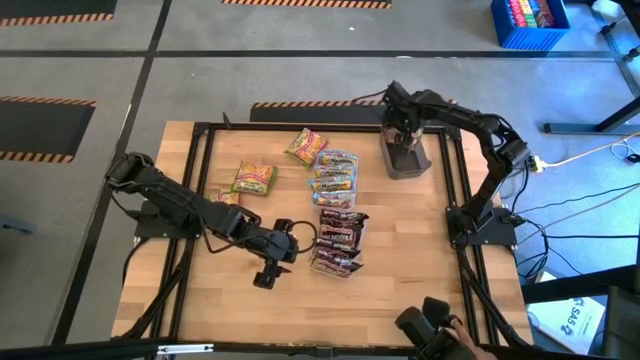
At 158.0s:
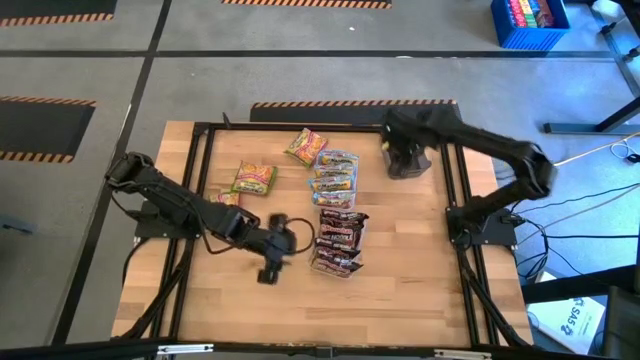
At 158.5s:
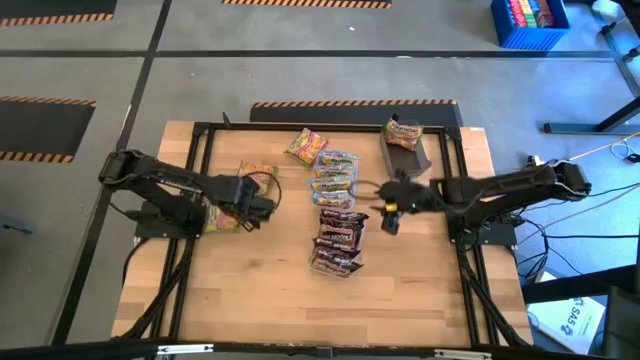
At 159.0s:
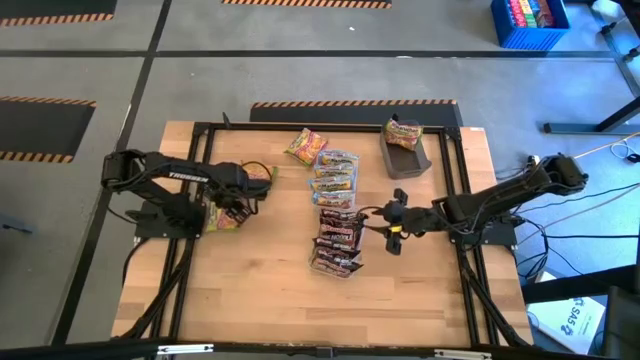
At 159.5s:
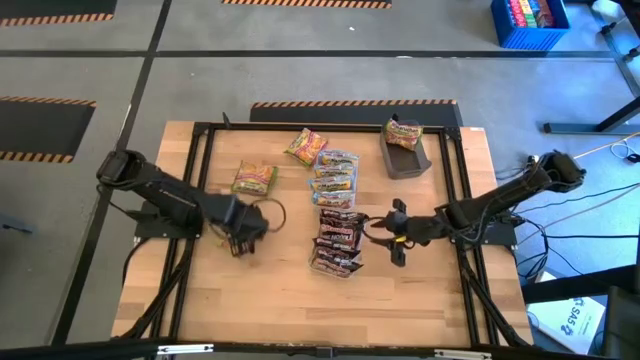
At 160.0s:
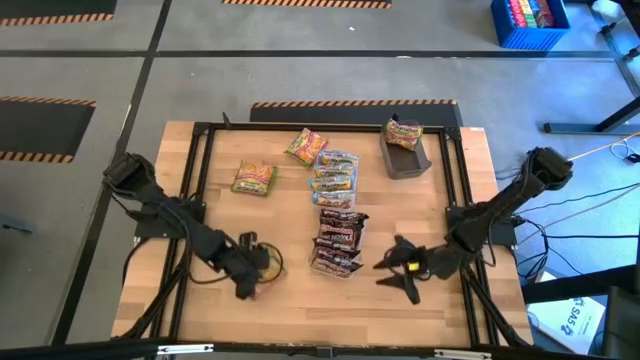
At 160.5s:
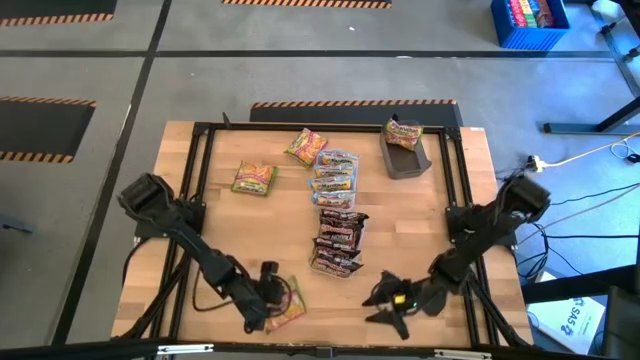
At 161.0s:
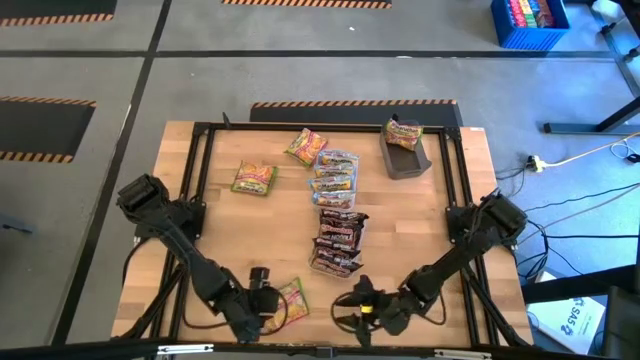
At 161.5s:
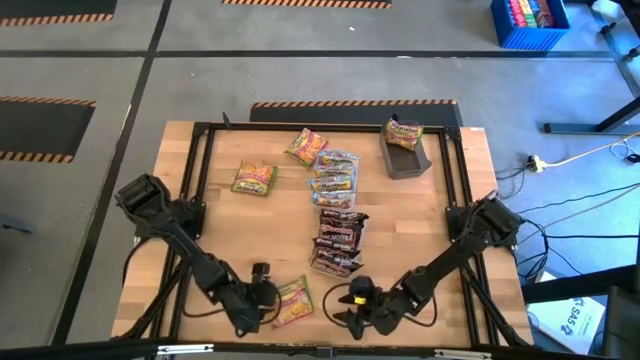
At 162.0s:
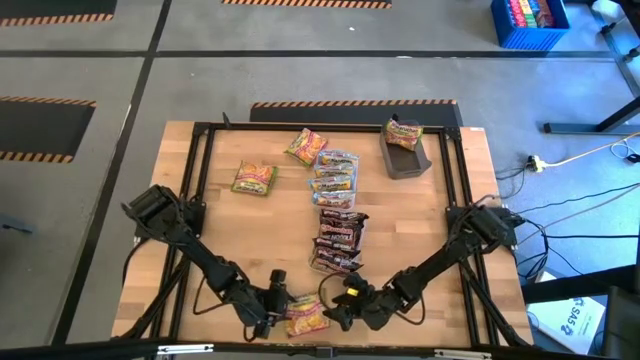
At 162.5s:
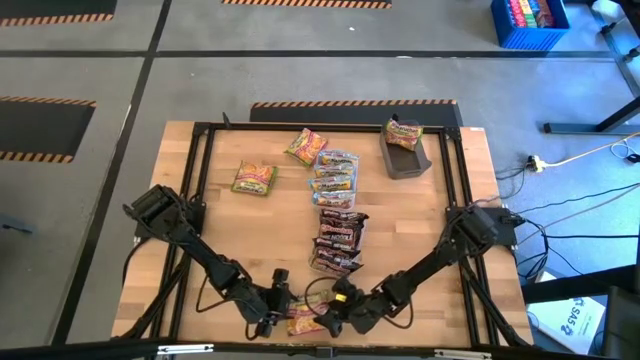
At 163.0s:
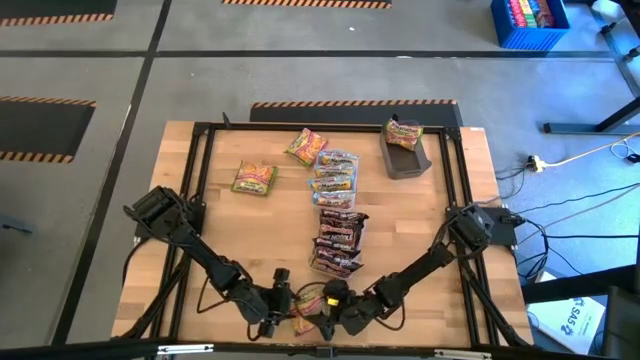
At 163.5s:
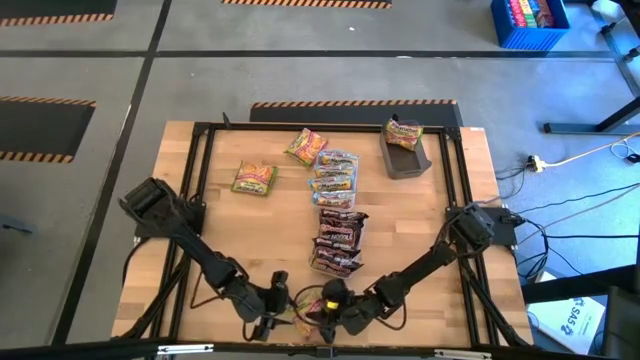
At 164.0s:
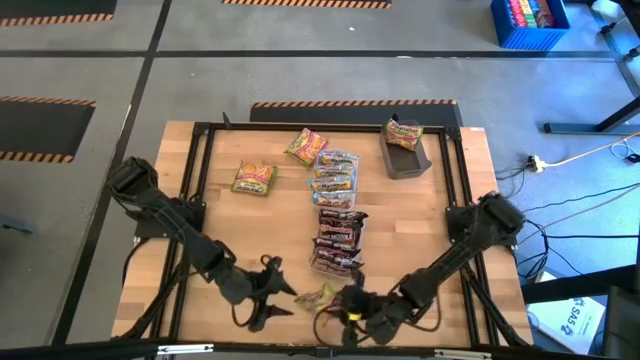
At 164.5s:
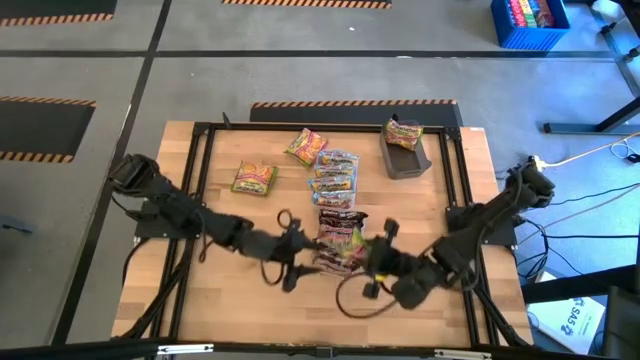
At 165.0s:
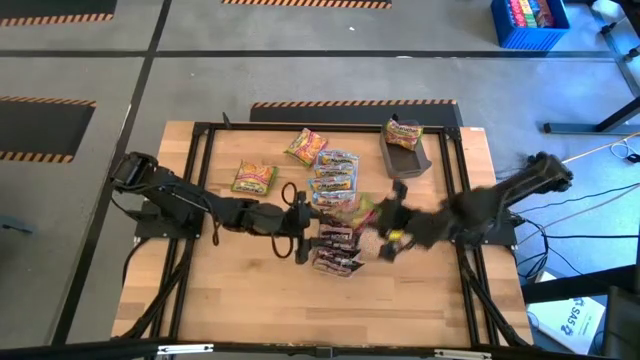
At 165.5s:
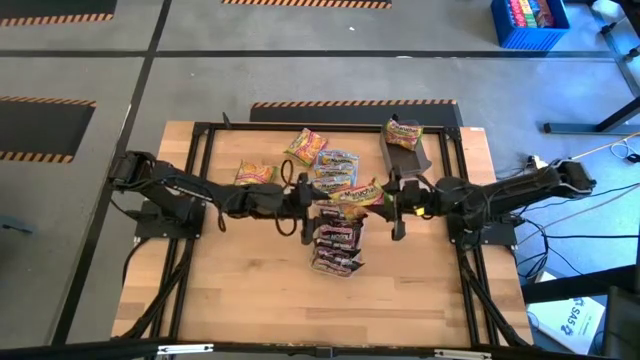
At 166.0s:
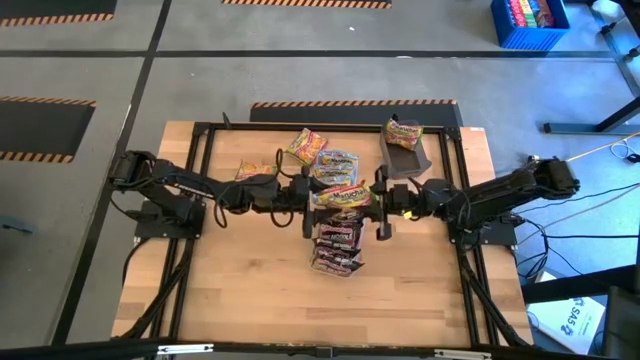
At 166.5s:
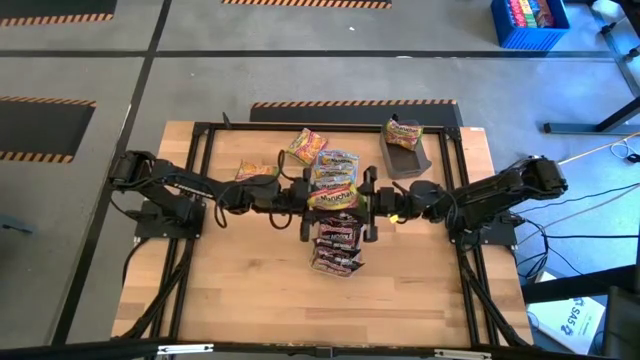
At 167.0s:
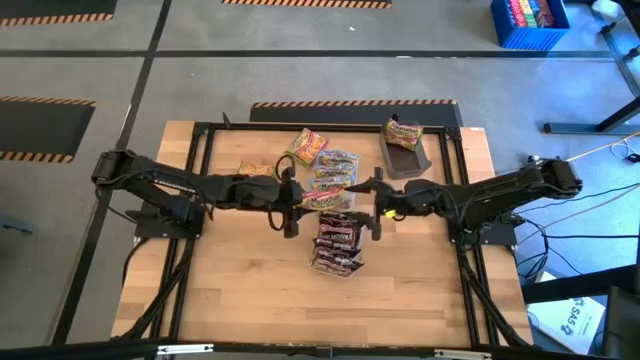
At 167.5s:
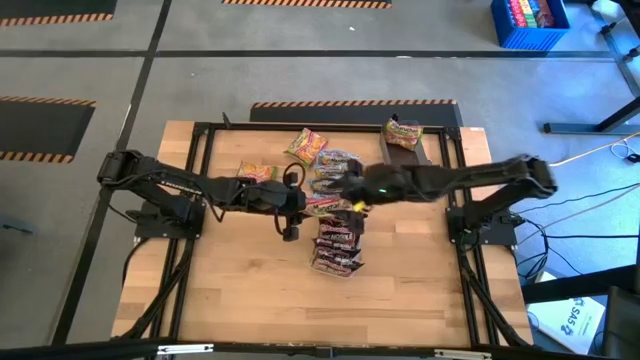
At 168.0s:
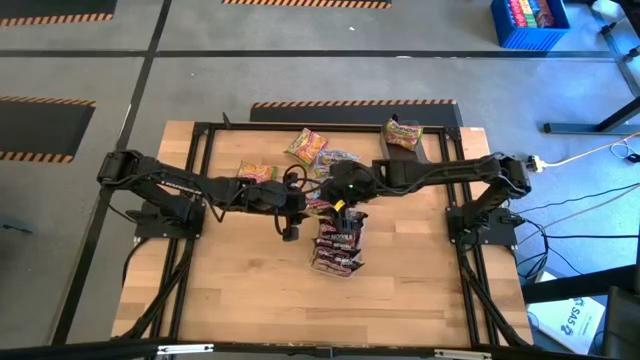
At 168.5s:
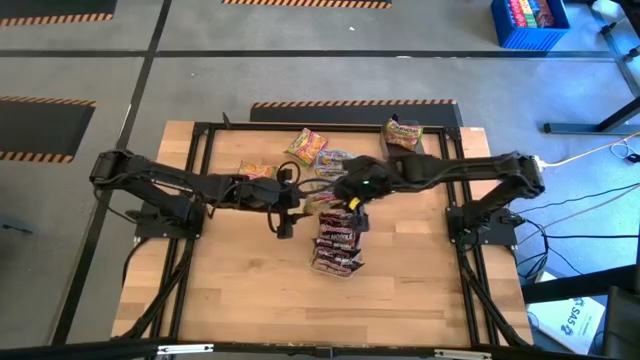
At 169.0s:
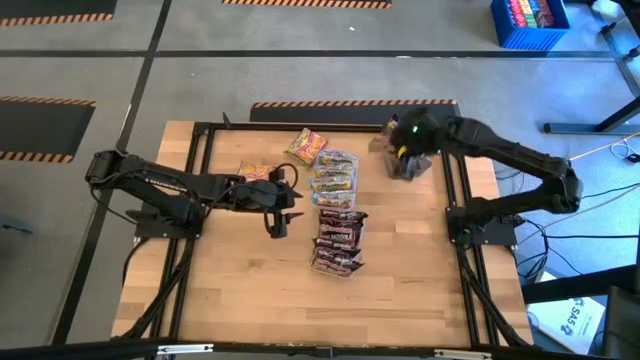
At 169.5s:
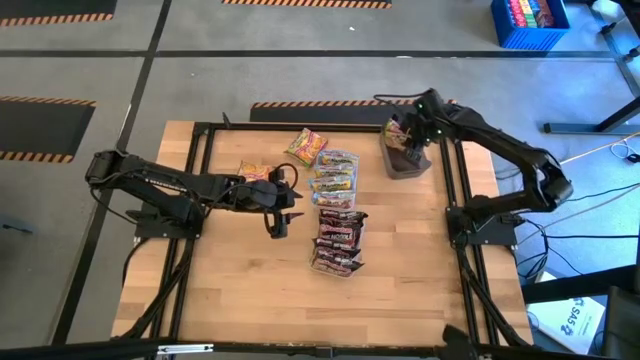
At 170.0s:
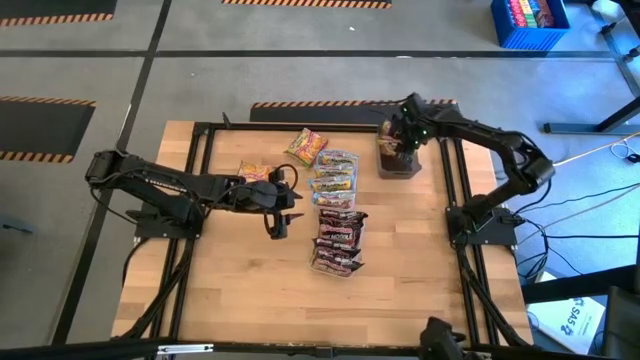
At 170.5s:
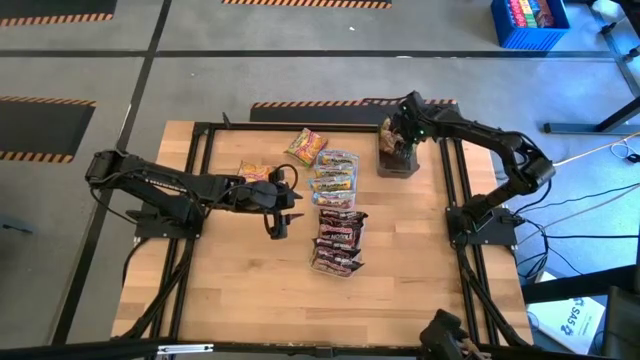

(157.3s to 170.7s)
Task: Sort Maruchan noodles
Put the bottom green noodle pack into the black bin

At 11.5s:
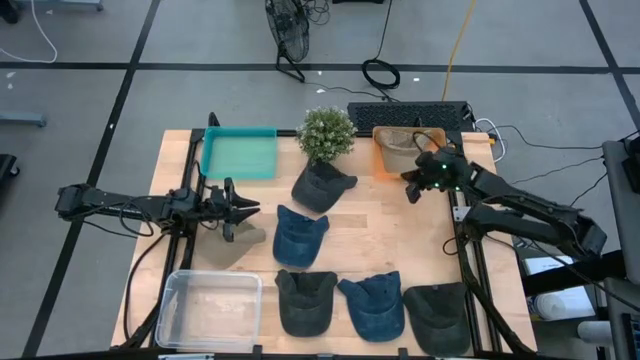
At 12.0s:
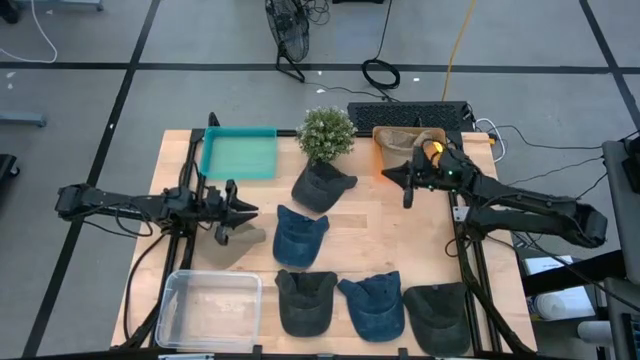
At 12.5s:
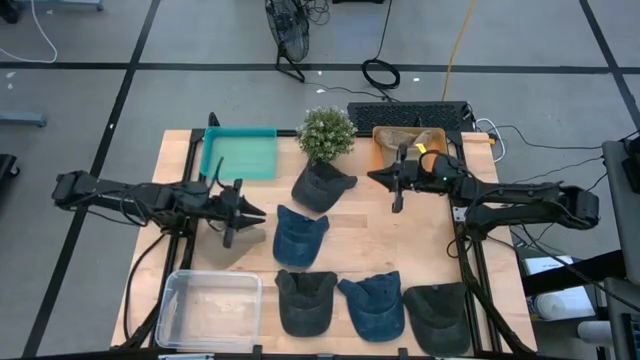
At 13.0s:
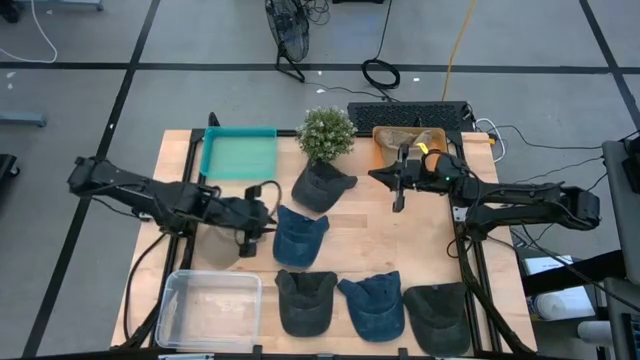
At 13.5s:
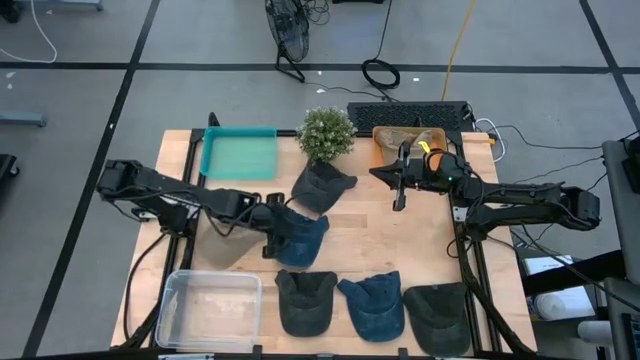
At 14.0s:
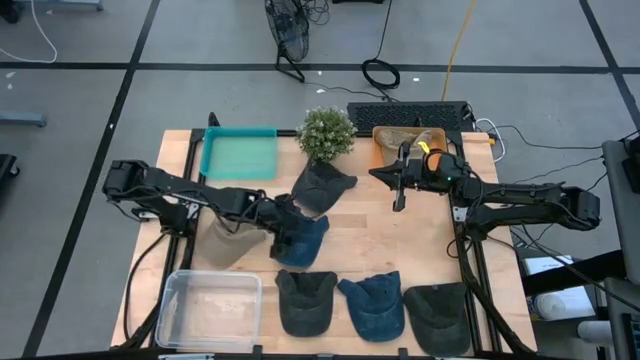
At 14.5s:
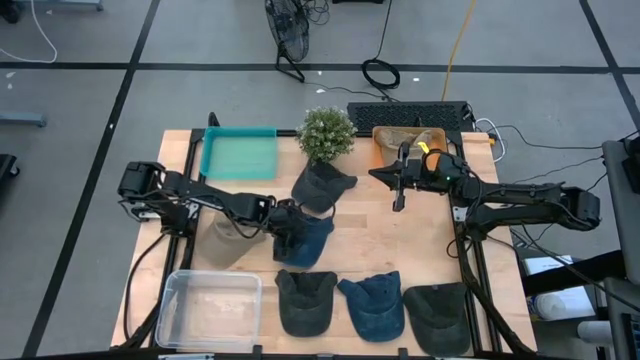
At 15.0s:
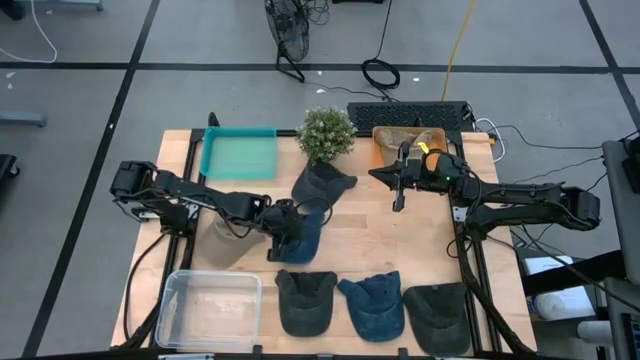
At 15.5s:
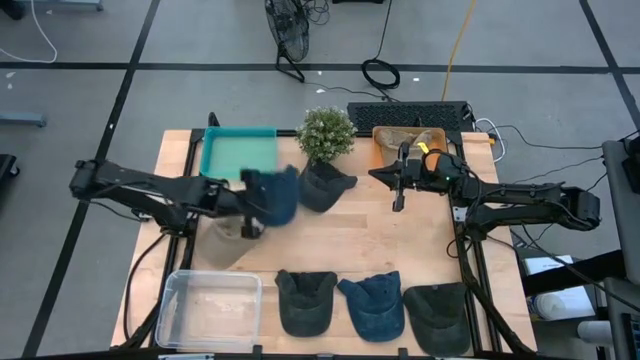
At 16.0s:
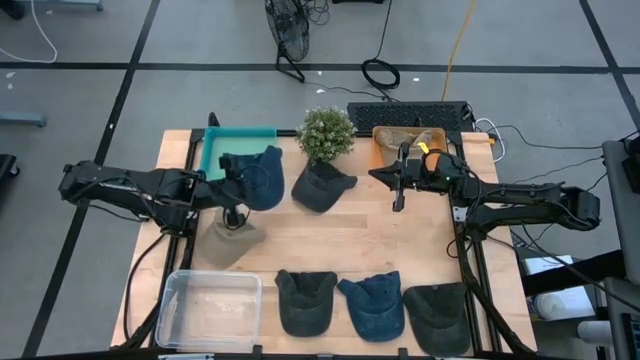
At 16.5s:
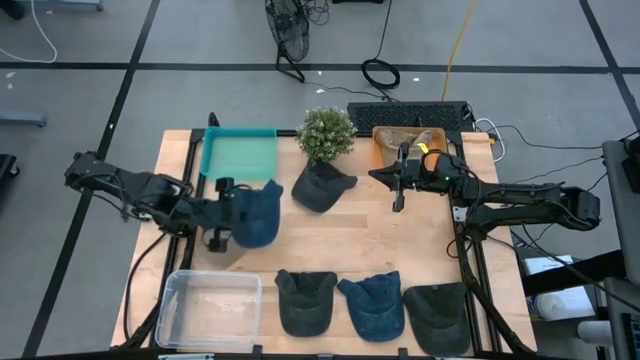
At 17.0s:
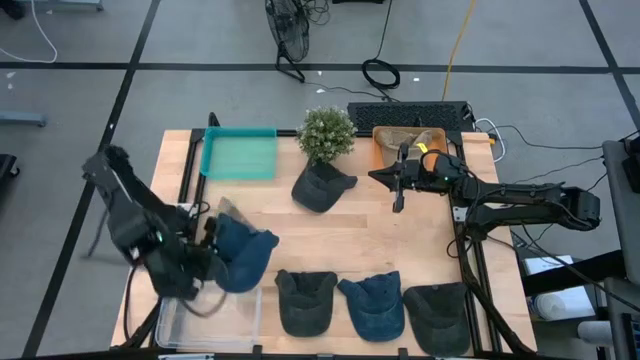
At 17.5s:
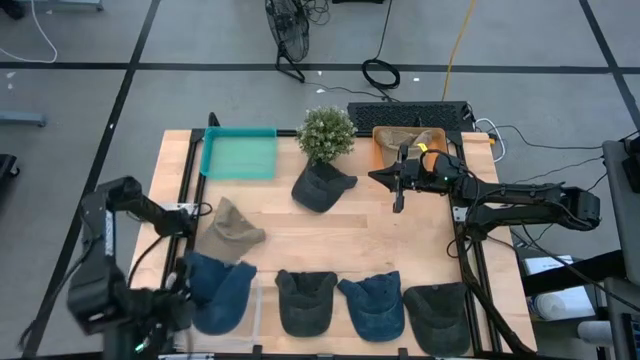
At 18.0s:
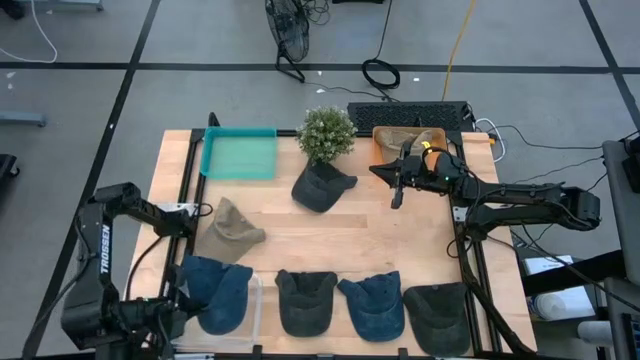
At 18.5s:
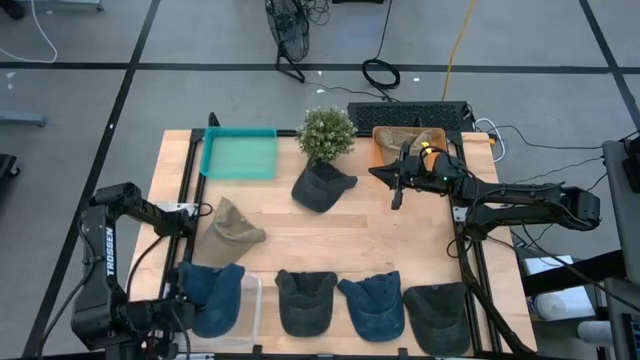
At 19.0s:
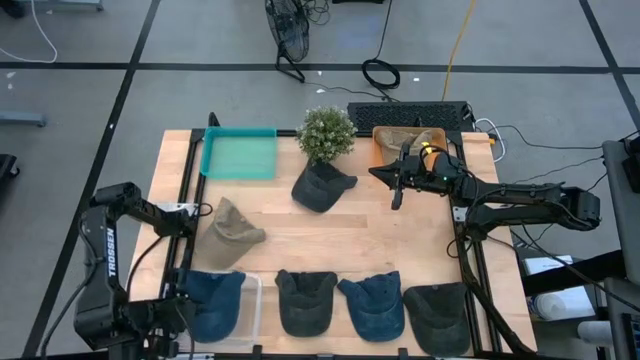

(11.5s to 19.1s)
Task: Pick & Place hat
Put the top blue cap into the transparent bin
